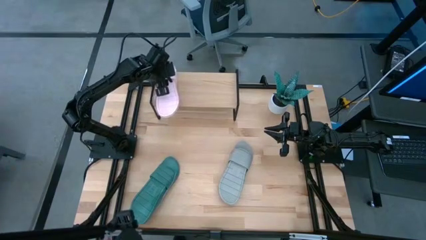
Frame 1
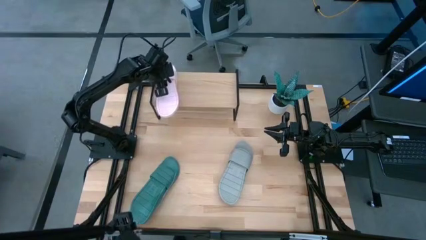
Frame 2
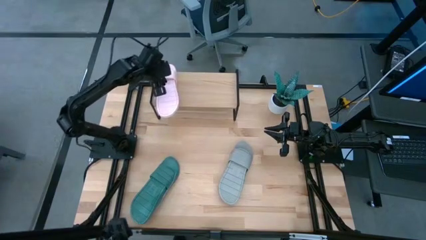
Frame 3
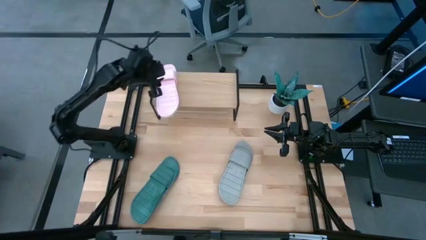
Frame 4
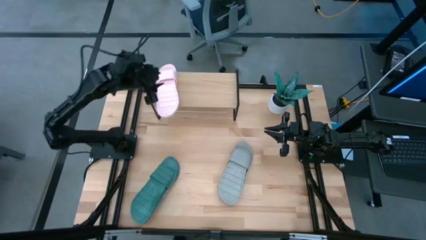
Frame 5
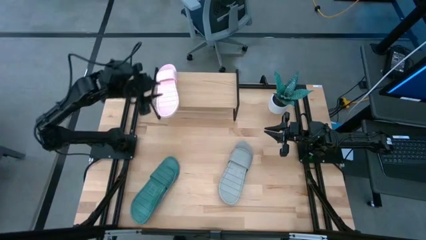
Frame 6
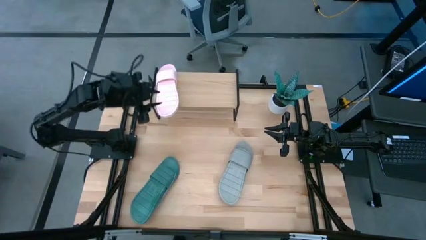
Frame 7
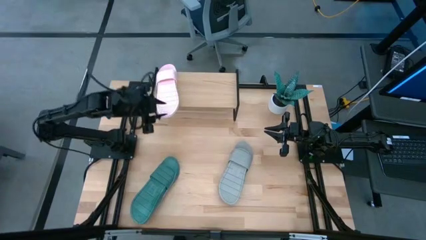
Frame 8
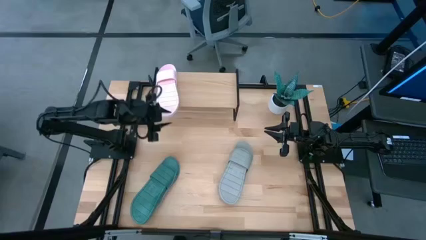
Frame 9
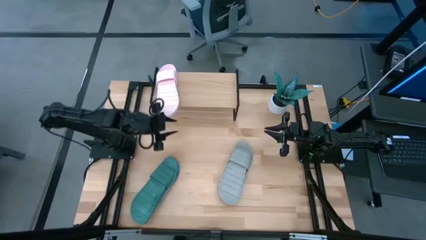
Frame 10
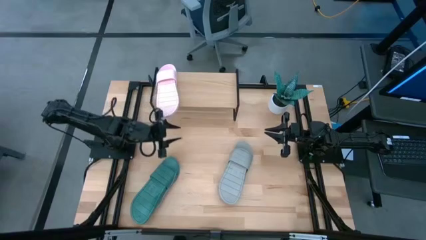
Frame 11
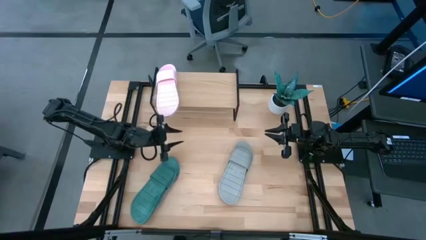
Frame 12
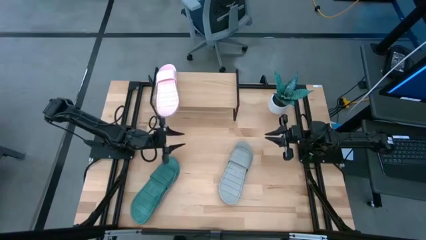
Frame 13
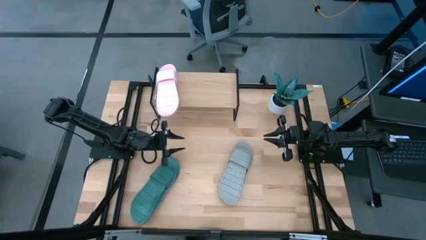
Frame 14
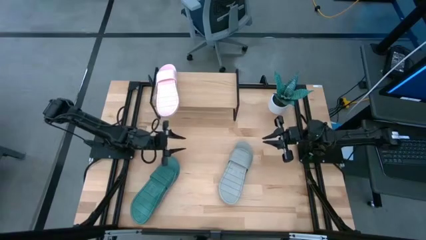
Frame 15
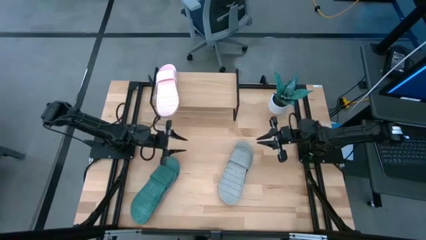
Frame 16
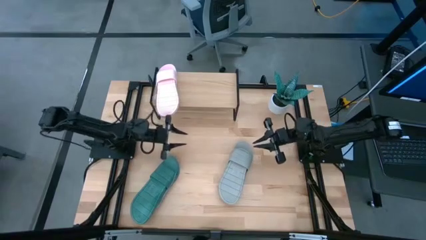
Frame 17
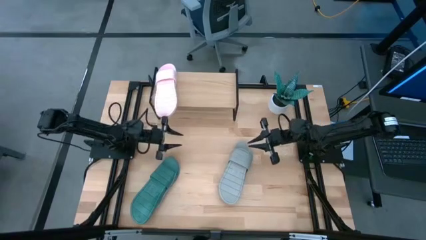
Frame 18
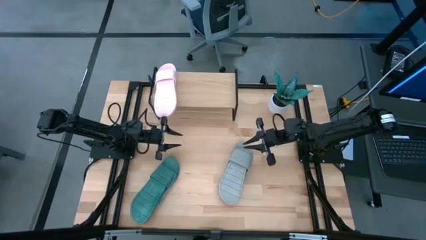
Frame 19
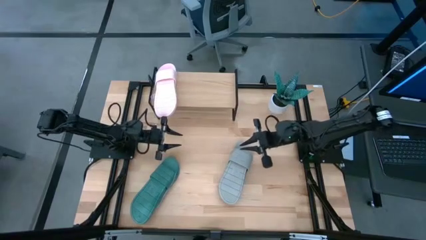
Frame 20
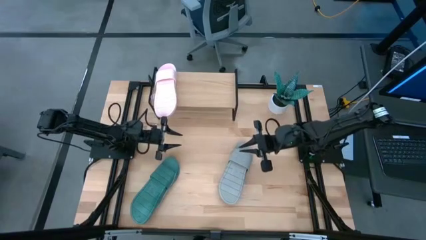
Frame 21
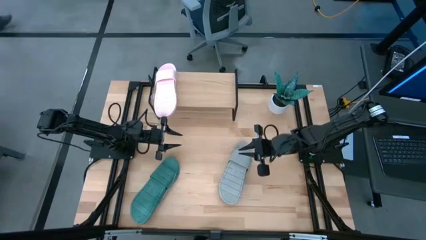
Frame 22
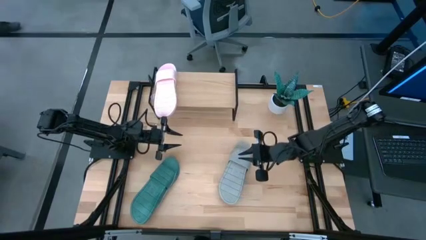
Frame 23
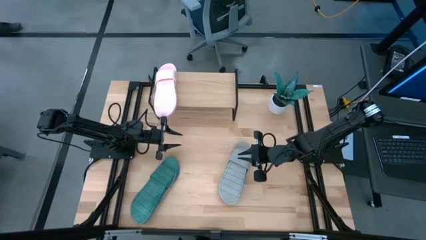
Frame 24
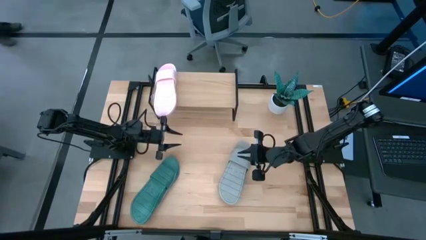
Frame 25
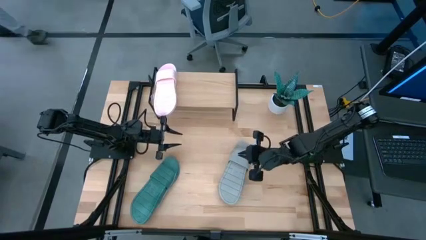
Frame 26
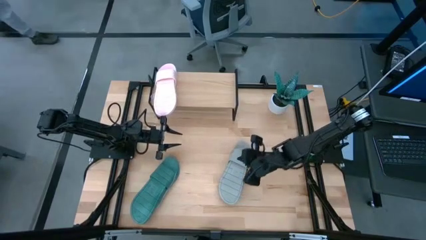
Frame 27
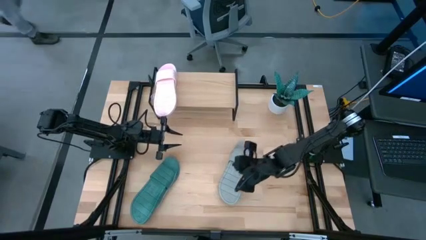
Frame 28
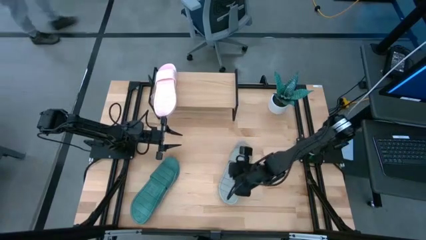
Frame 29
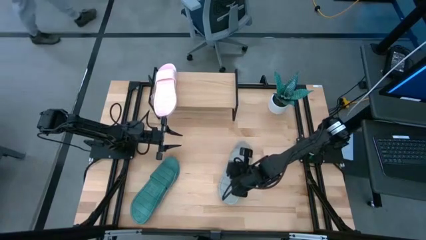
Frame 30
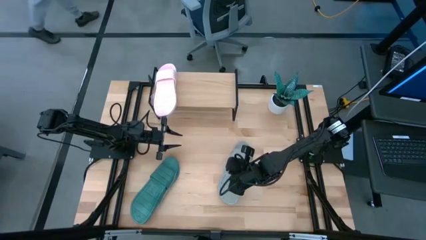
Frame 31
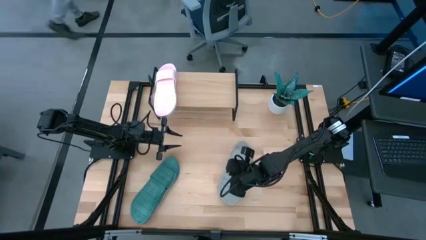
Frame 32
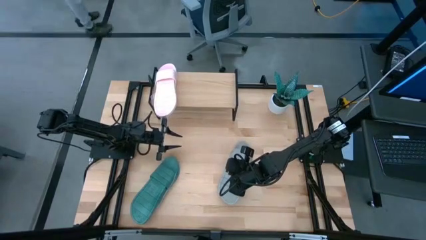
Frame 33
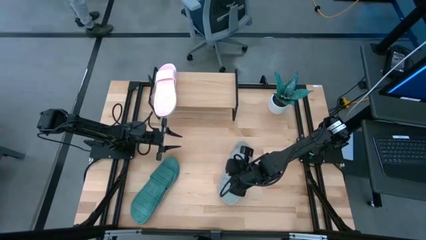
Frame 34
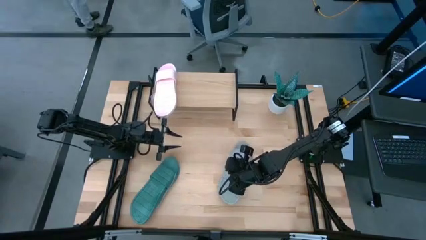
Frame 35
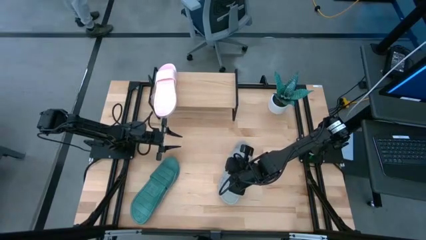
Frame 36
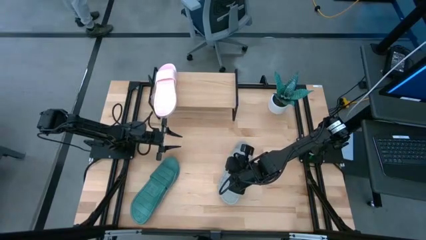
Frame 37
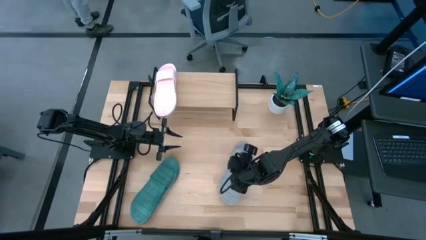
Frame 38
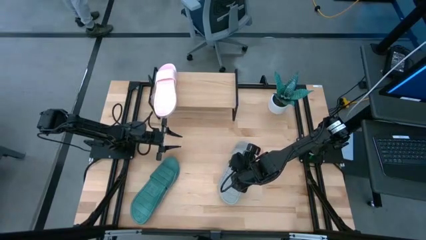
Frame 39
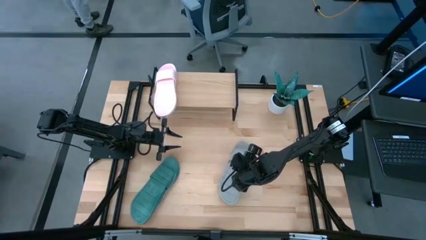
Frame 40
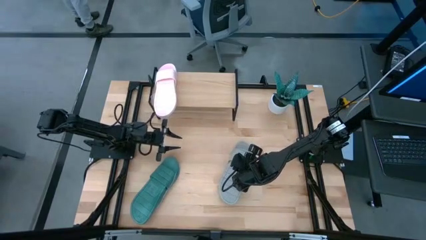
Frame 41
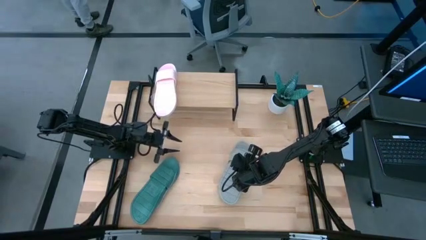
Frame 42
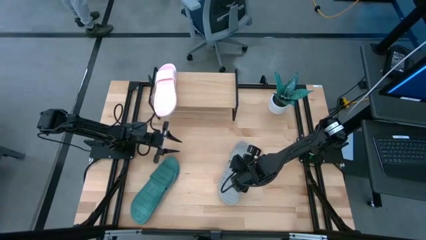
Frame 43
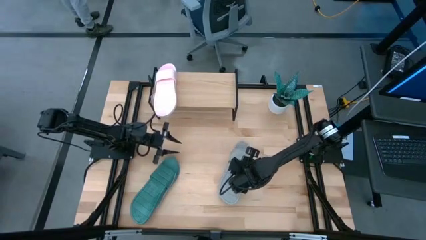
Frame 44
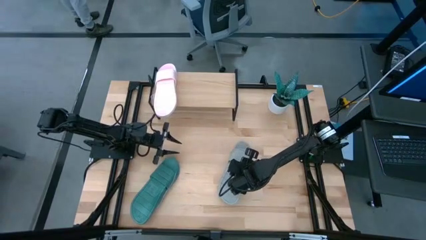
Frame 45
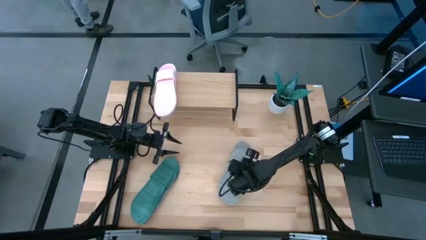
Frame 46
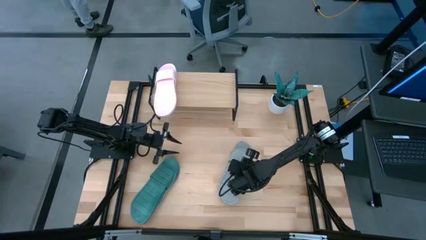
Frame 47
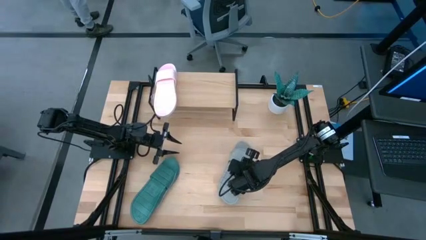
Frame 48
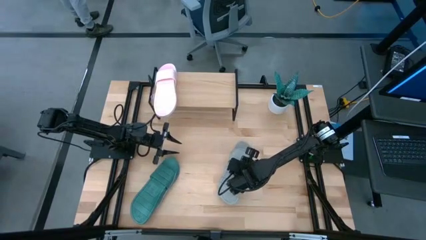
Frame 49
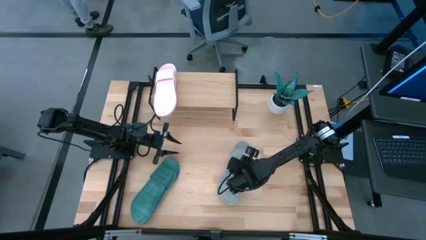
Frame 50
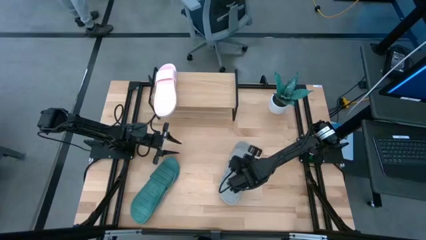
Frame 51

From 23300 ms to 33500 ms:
Task: Pick and place slides into the shelf
Put the gray pair of slides on the shelf

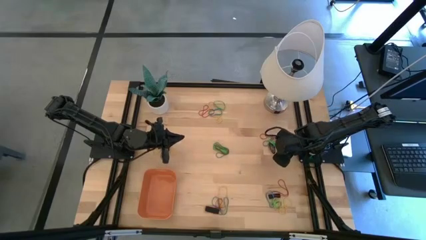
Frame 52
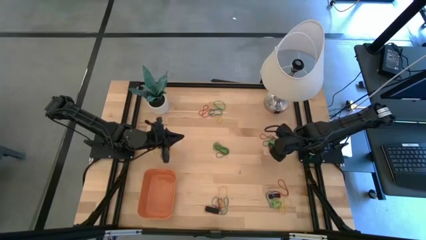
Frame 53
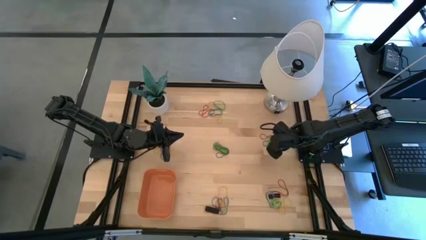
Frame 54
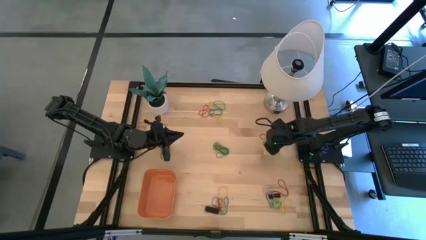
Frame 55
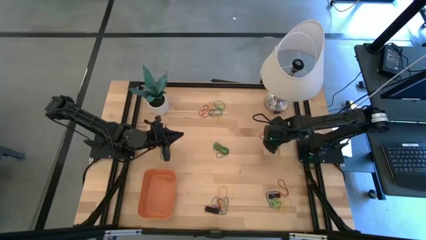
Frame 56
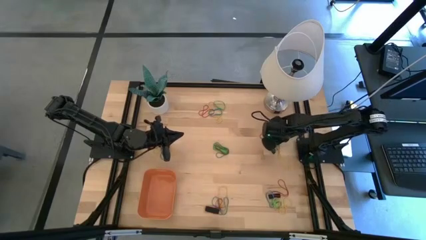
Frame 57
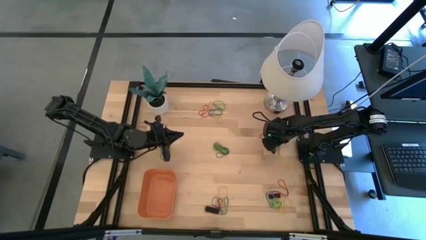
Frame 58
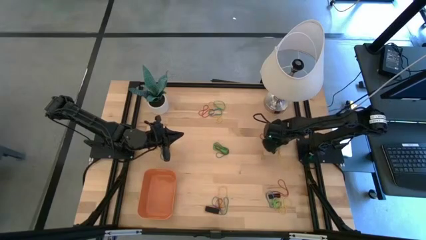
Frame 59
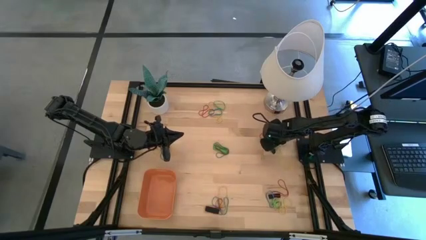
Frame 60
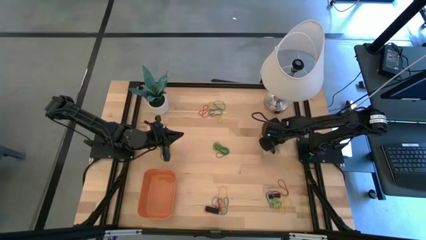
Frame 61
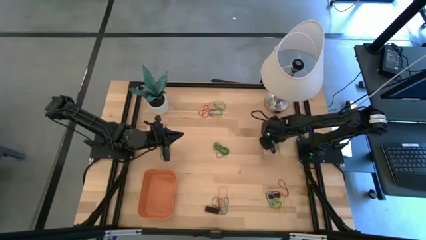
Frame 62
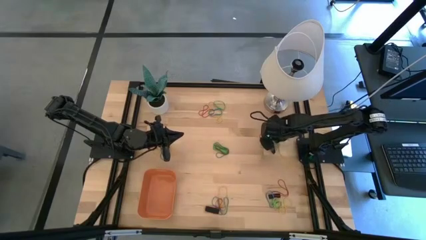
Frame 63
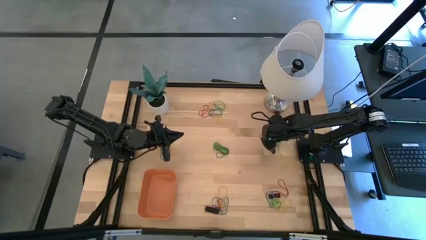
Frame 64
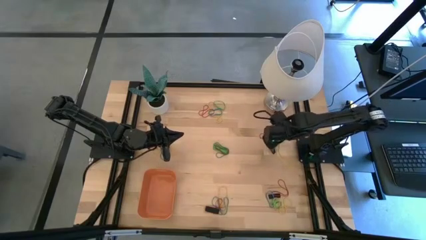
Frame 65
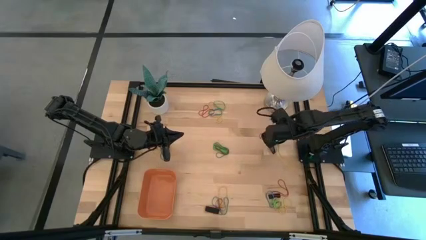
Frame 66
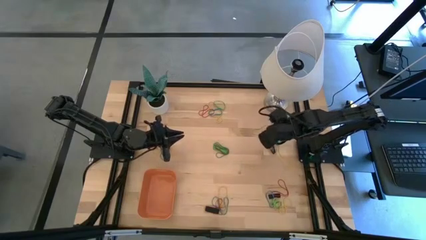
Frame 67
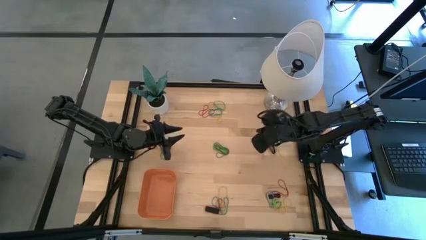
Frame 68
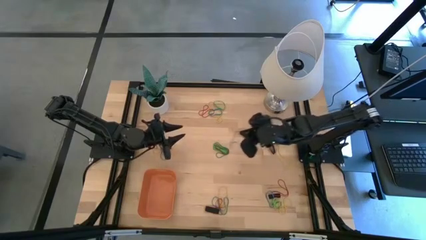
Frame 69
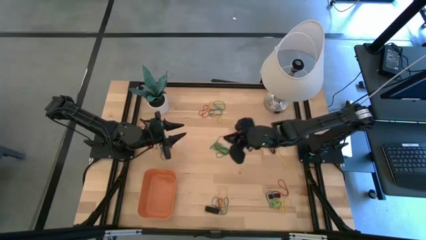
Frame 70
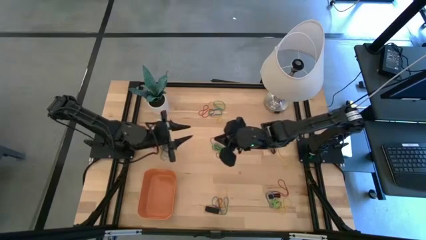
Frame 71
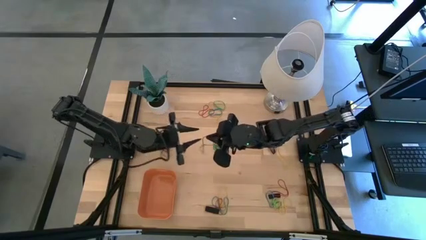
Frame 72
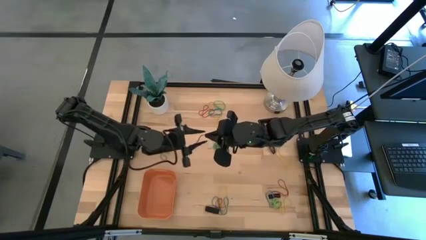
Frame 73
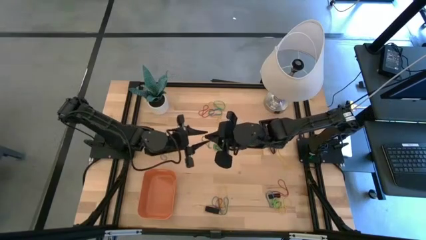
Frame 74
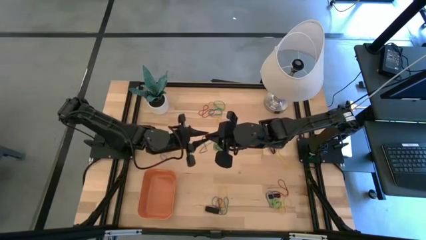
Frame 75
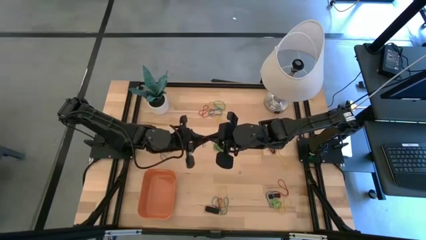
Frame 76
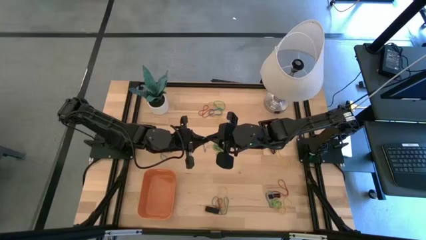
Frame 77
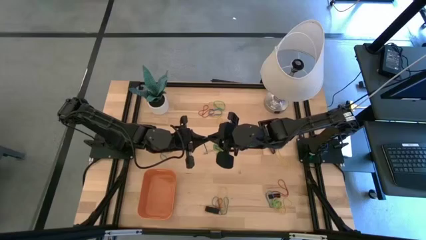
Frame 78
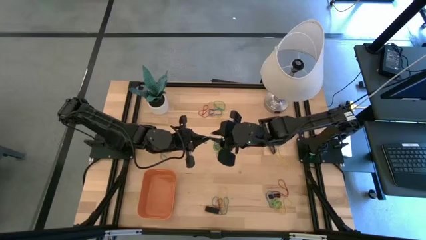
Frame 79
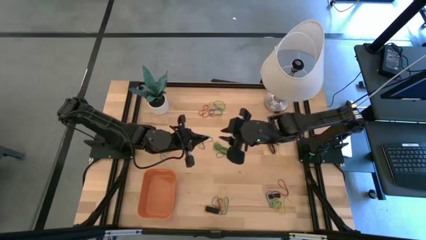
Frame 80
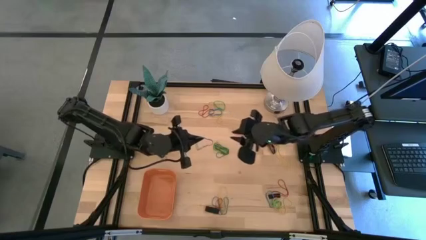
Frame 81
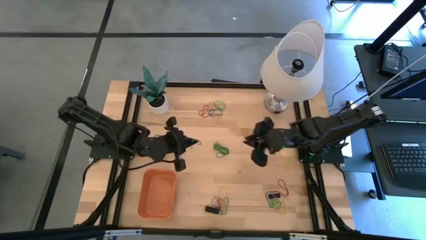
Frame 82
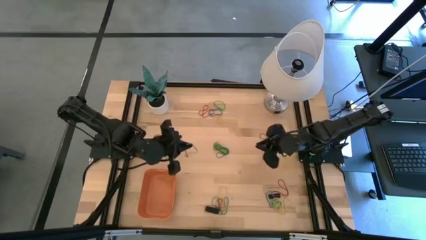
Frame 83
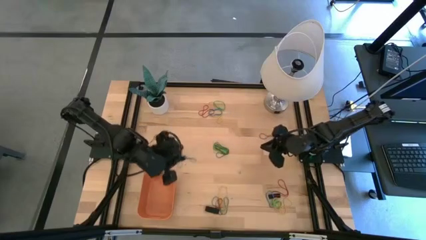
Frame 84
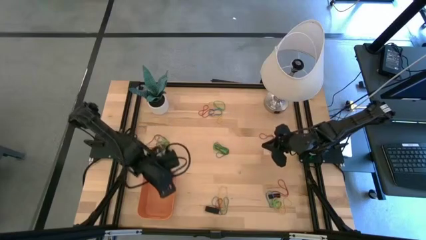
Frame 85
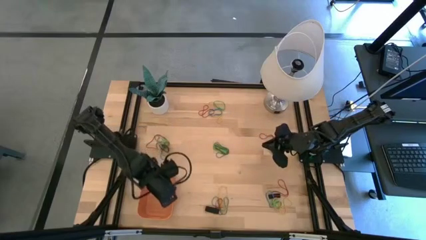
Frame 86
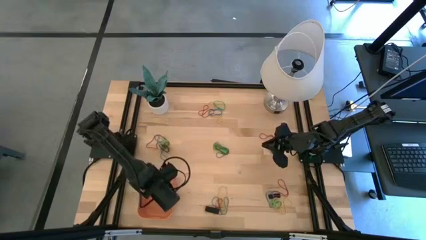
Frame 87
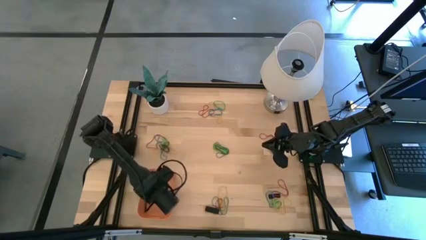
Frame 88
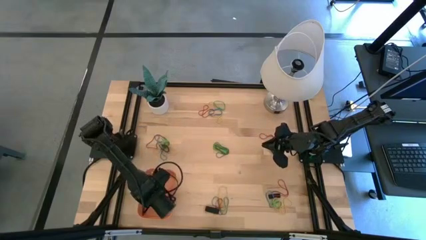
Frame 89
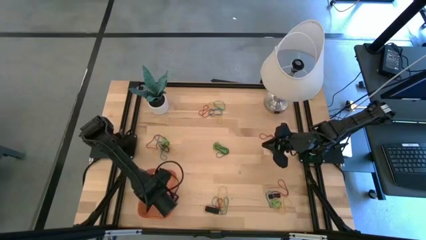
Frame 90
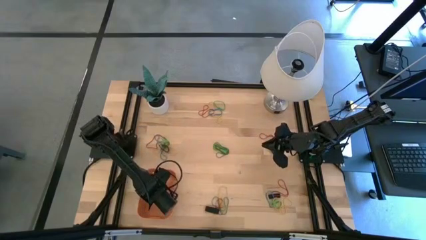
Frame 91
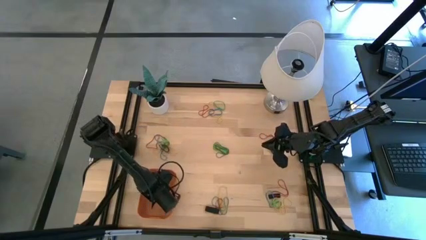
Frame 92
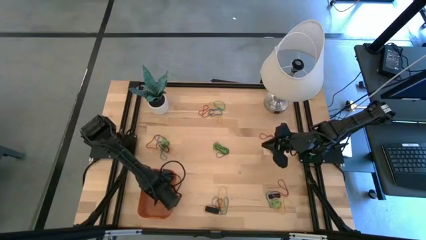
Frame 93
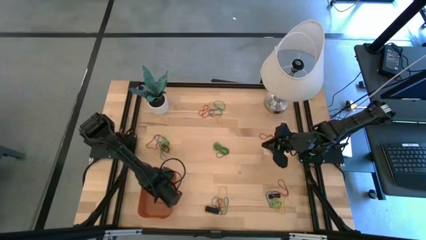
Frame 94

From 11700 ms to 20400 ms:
Task: Pick and place rubber bands into bin
Put the blue rubber band into the orange bin
